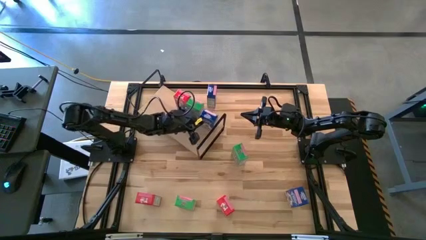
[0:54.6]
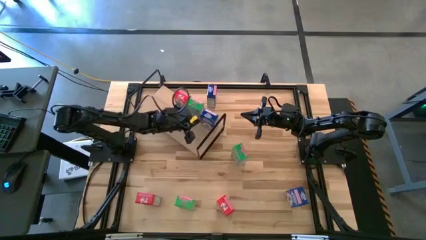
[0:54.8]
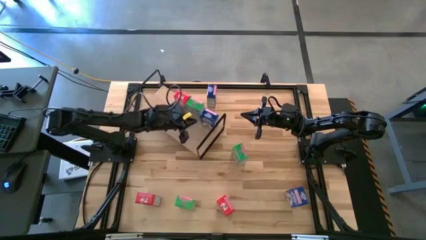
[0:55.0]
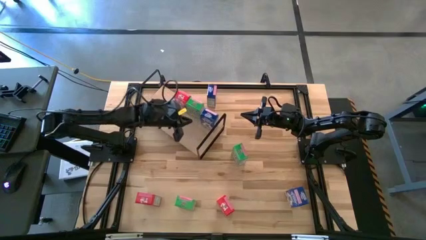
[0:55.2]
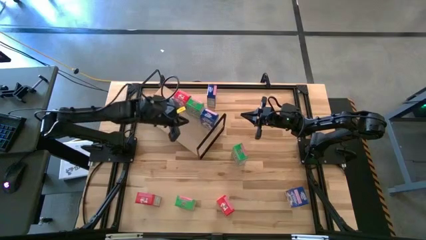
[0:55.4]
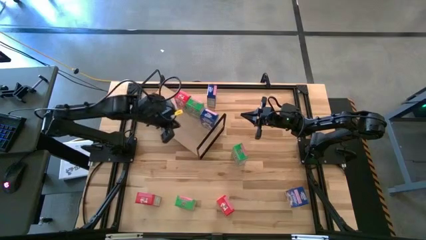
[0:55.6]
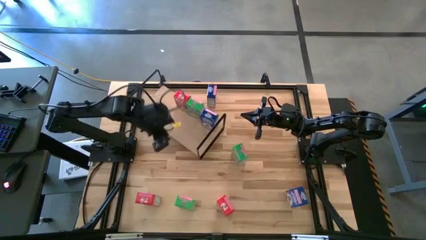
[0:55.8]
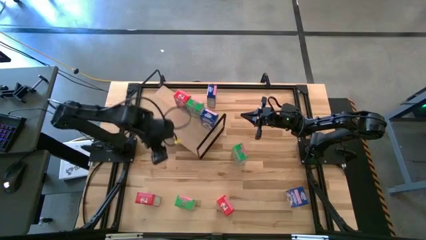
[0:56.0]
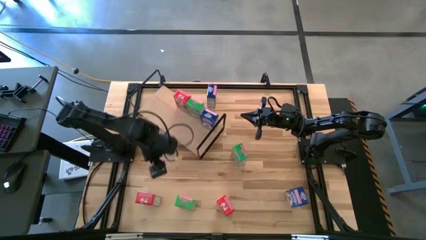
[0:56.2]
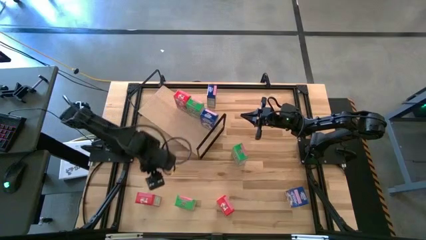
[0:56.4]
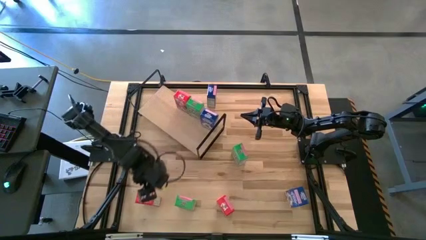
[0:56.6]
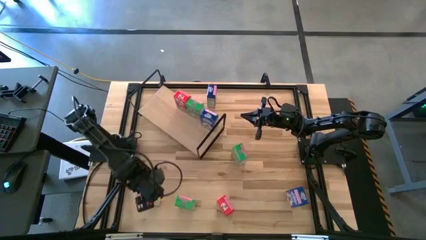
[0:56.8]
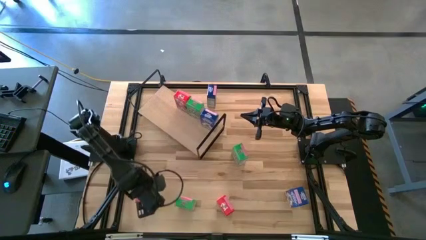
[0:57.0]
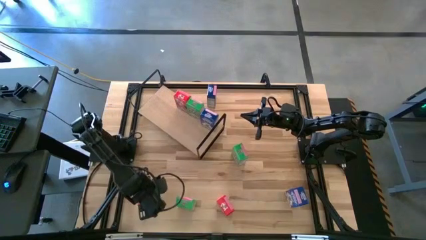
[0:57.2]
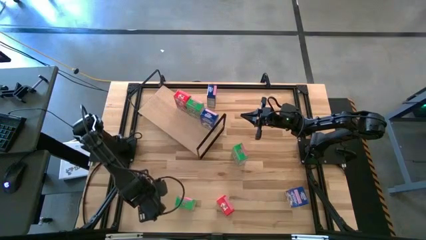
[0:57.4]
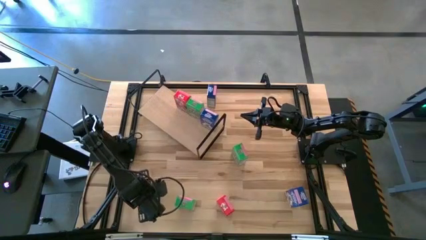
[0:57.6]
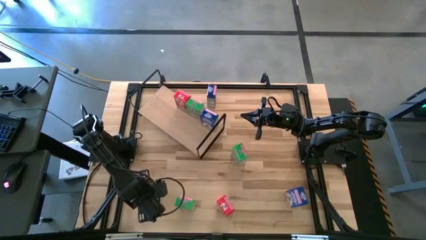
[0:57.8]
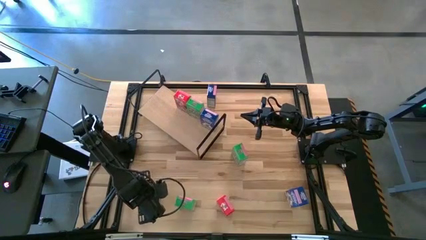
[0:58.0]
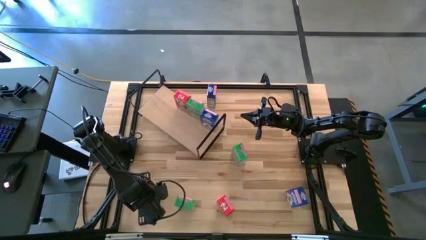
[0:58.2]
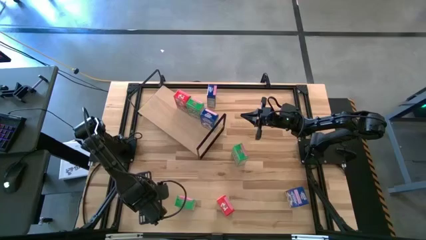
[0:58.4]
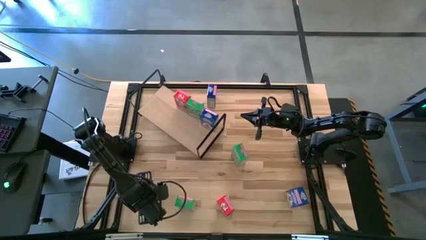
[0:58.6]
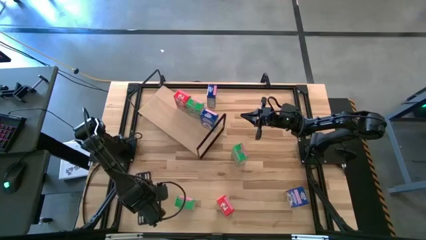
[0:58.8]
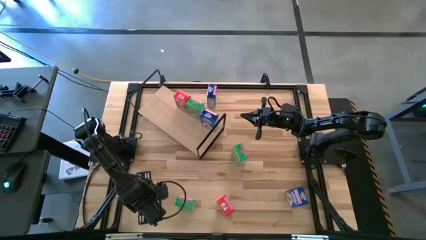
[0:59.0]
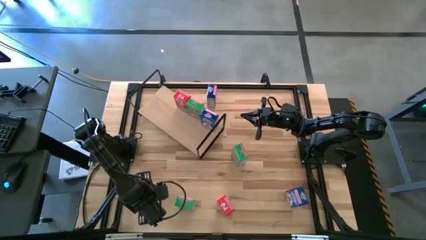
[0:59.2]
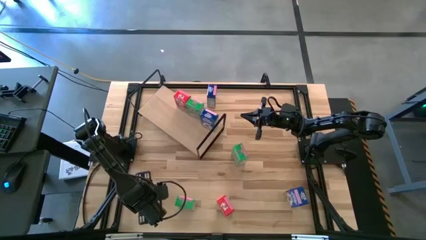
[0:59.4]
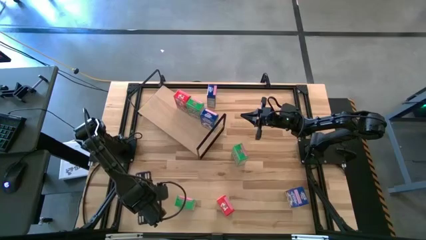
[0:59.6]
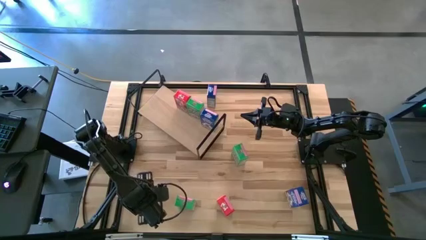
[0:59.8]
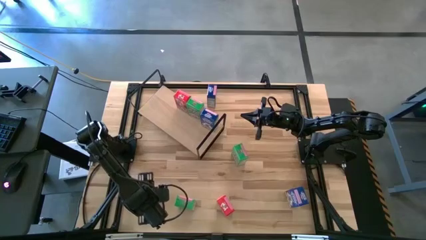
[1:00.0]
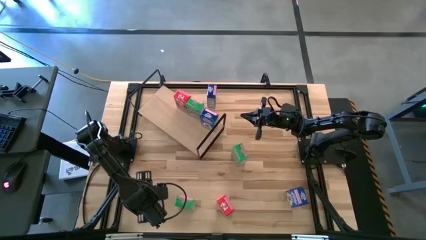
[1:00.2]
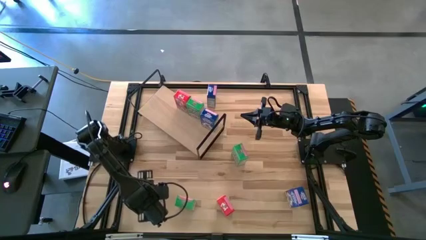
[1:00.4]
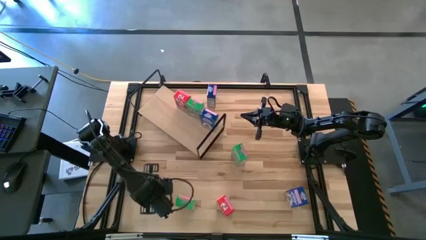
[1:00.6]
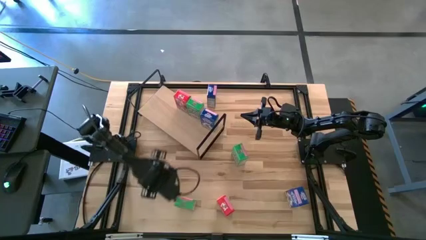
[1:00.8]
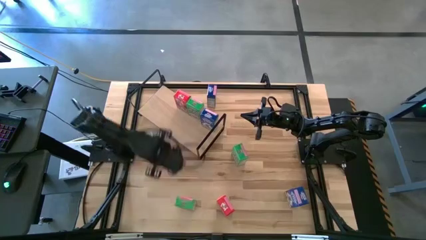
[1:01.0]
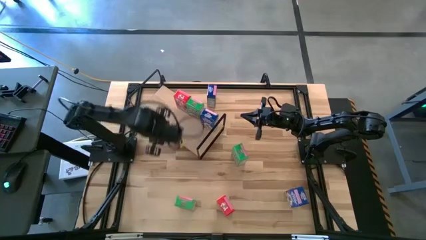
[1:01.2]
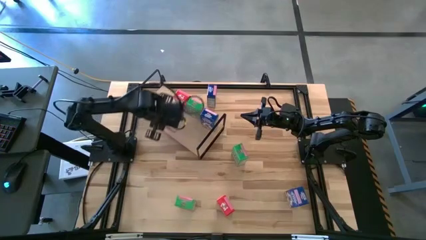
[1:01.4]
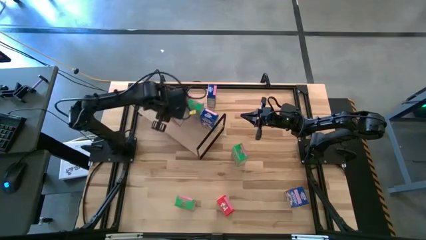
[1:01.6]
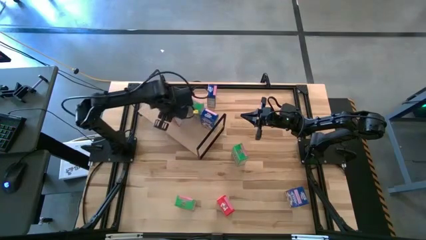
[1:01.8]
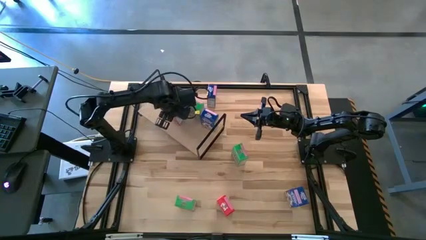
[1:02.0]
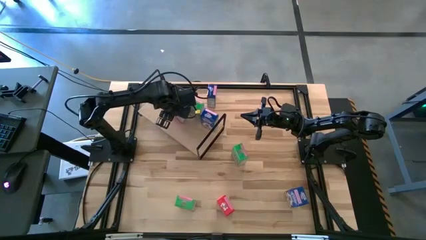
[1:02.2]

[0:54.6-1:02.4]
Task: Stack cereal on shelf
Put the bottom left red cereal on the shelf

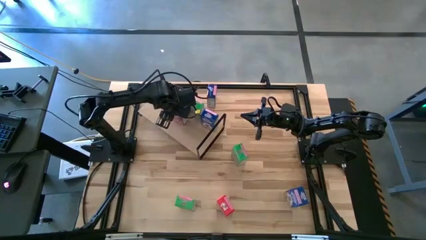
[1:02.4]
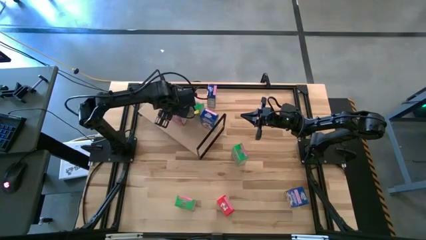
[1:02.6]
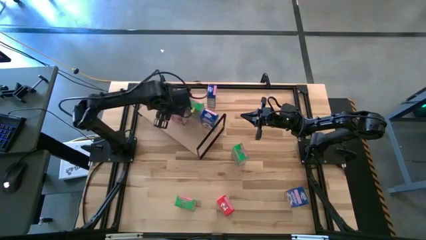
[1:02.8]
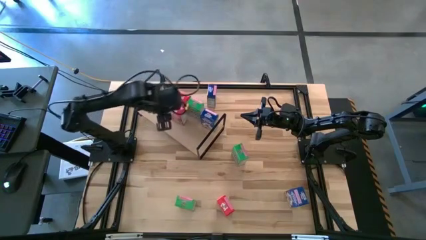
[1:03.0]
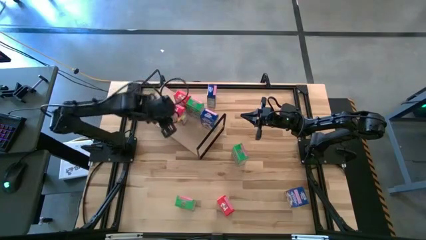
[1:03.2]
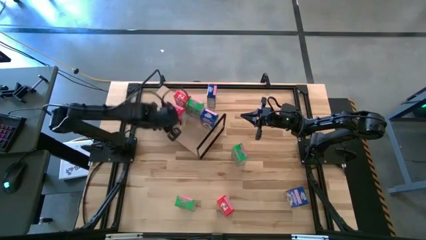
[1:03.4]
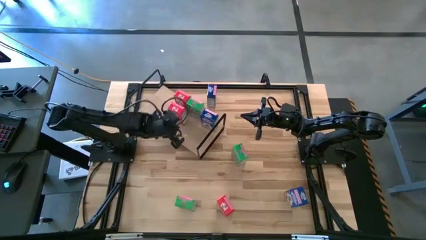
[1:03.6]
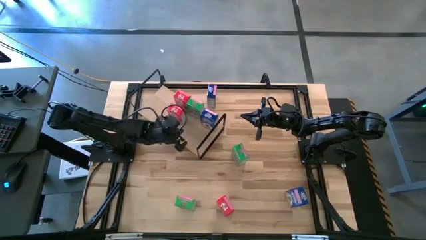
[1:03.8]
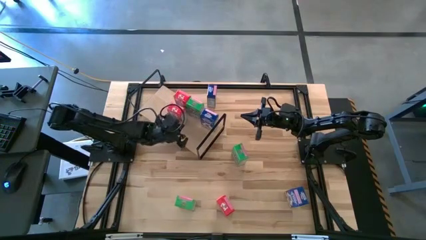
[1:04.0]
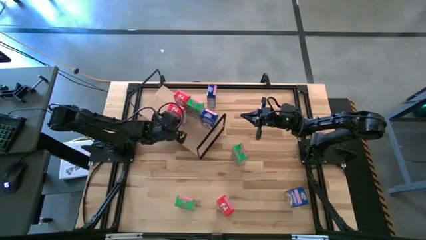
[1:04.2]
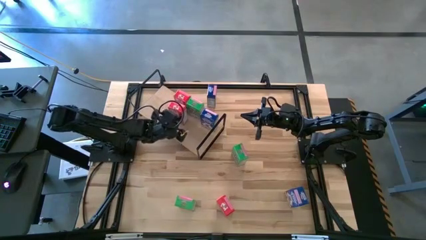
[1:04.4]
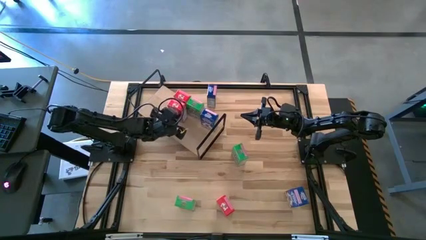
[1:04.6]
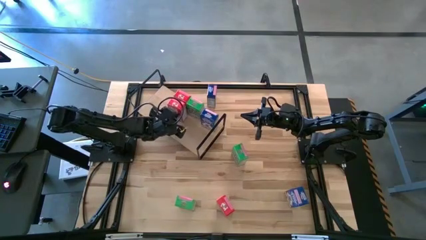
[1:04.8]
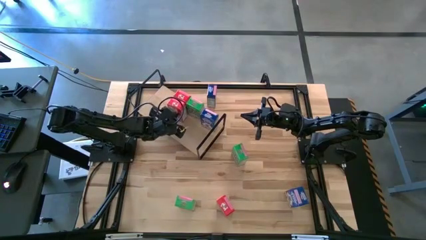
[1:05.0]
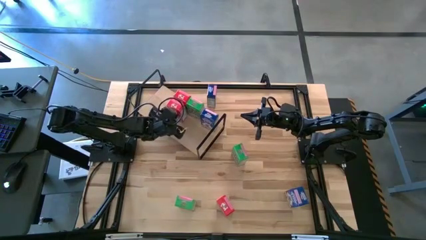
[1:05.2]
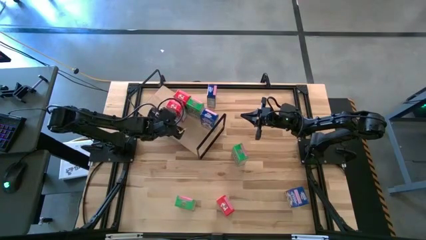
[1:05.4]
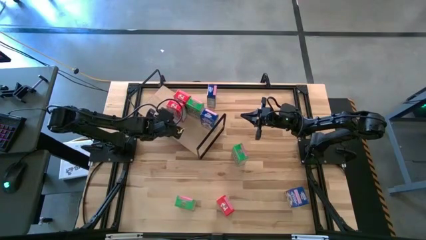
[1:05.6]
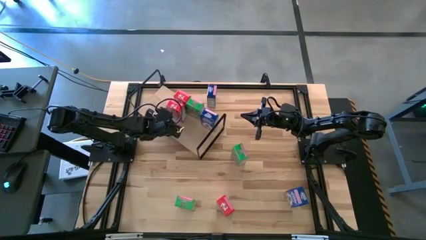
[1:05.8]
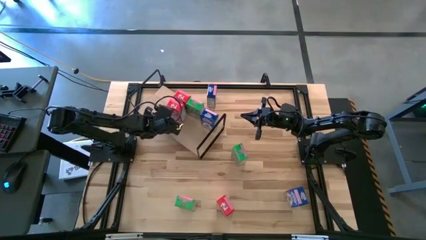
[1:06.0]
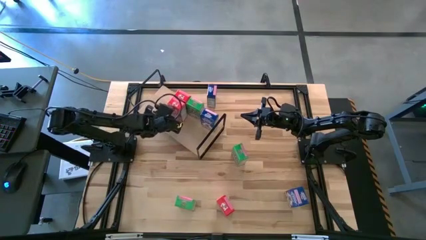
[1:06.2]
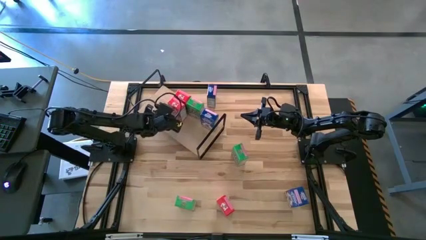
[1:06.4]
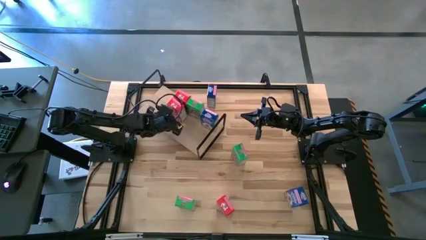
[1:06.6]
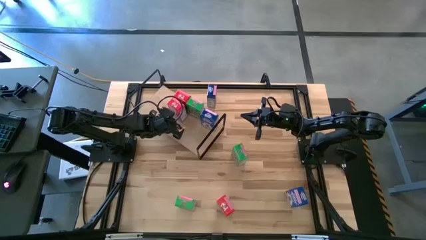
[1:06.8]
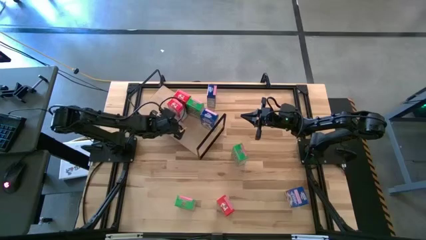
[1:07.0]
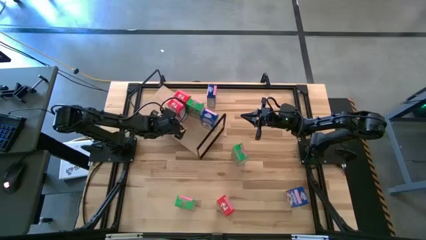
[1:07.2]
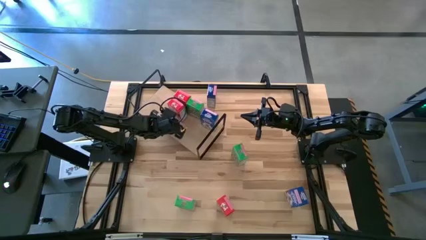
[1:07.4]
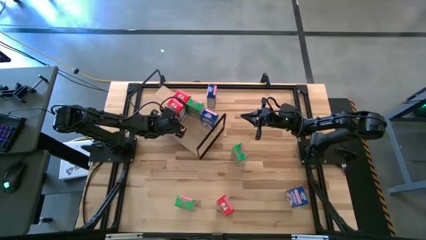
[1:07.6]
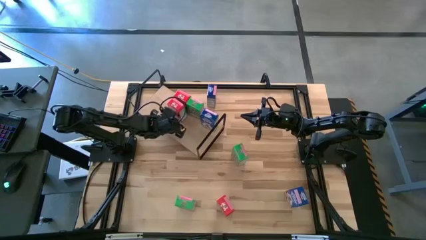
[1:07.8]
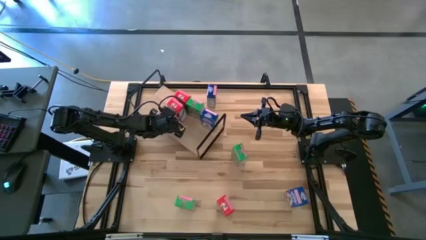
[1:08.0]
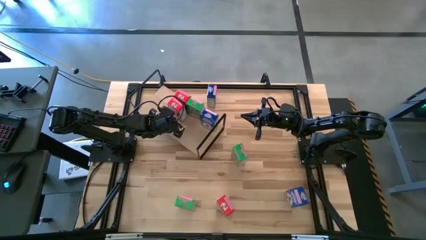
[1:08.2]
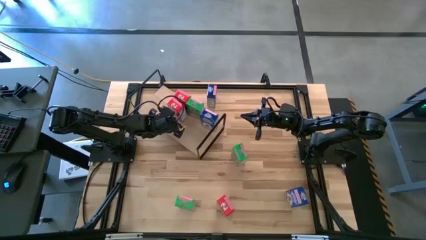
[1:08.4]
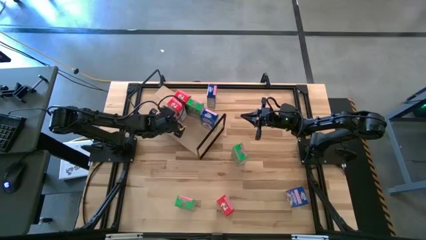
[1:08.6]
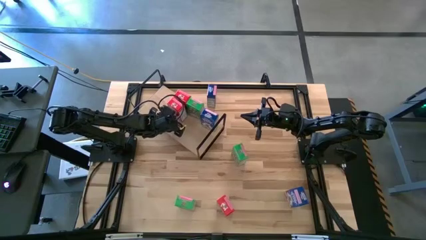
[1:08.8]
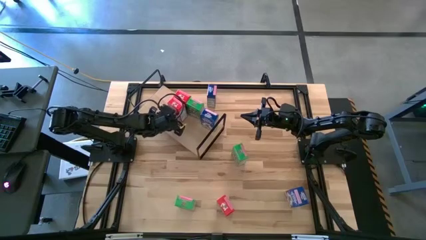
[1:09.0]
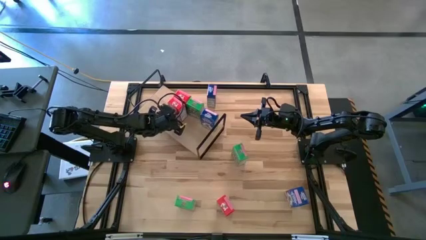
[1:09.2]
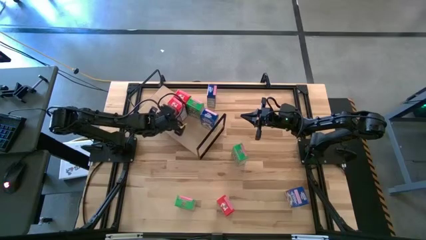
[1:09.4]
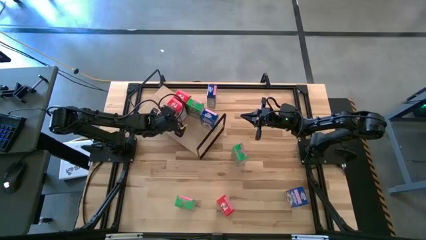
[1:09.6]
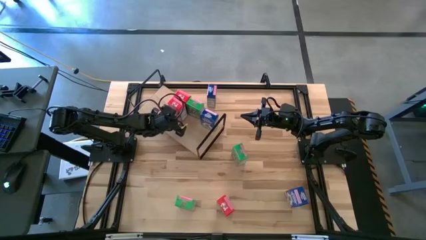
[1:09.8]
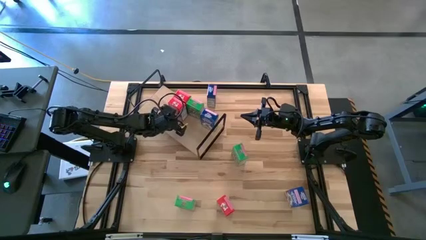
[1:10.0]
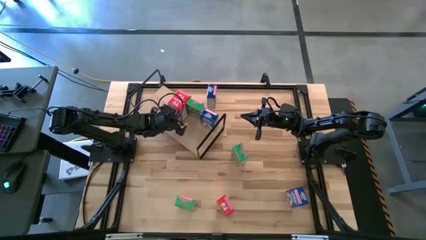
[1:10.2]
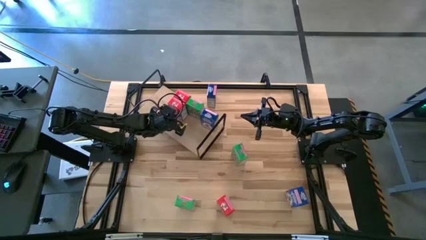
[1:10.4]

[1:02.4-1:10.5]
Adjust the red cereal on the shelf
